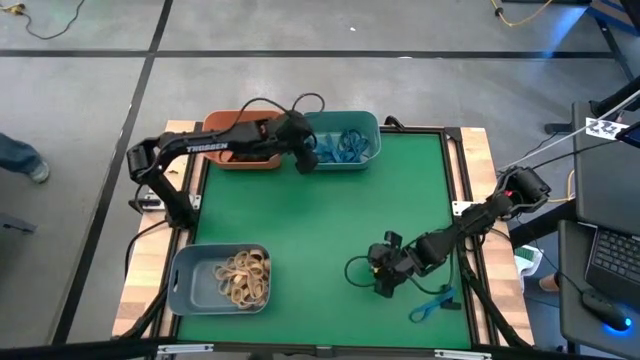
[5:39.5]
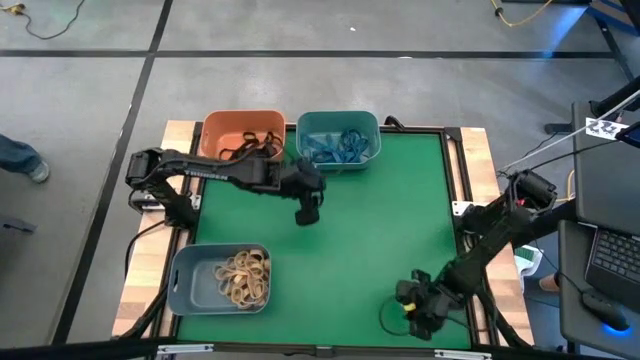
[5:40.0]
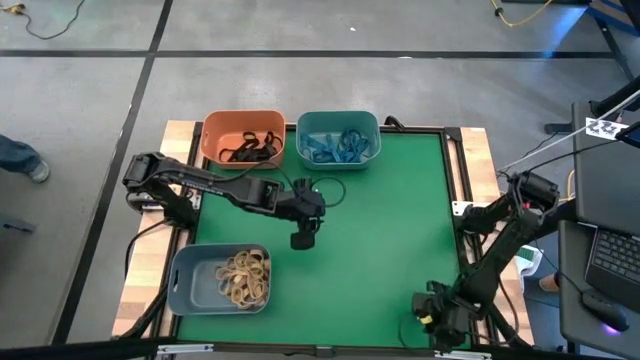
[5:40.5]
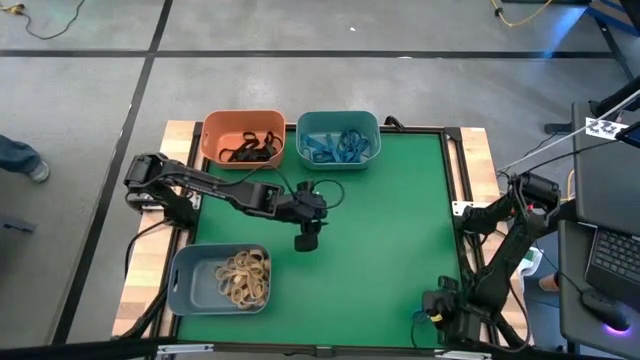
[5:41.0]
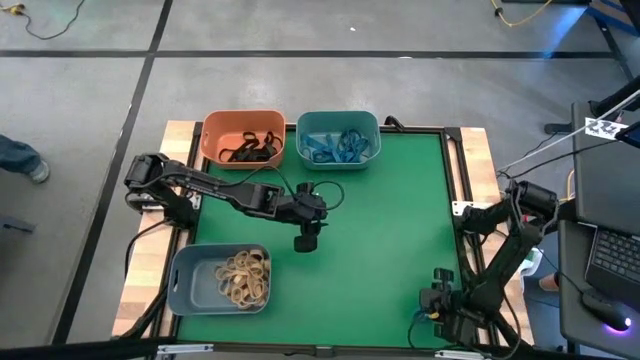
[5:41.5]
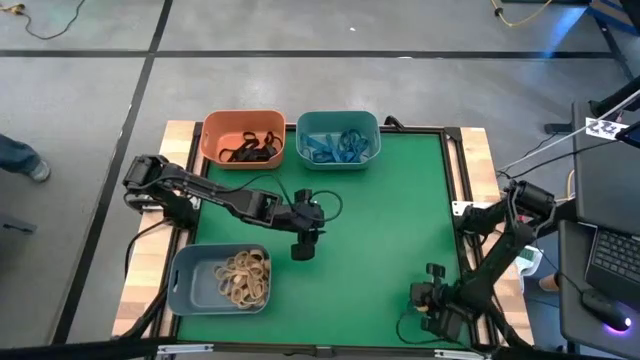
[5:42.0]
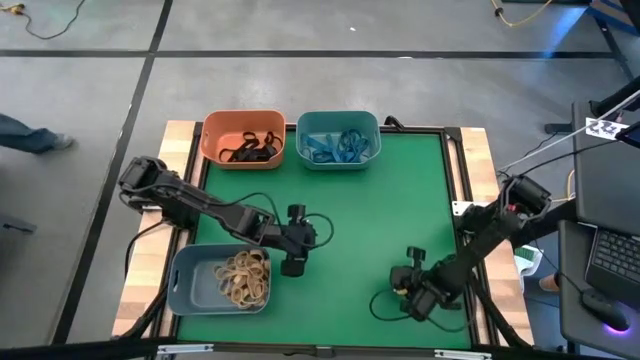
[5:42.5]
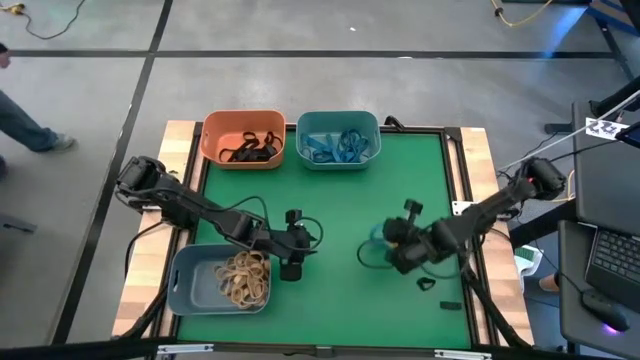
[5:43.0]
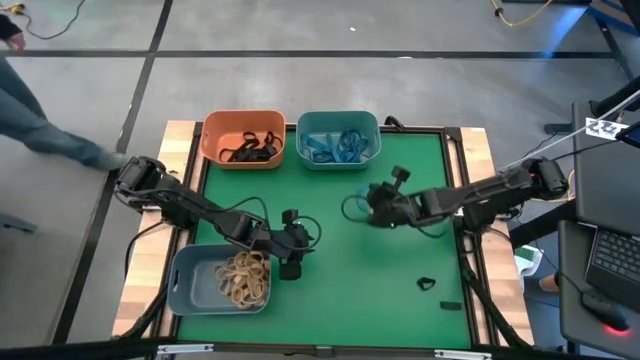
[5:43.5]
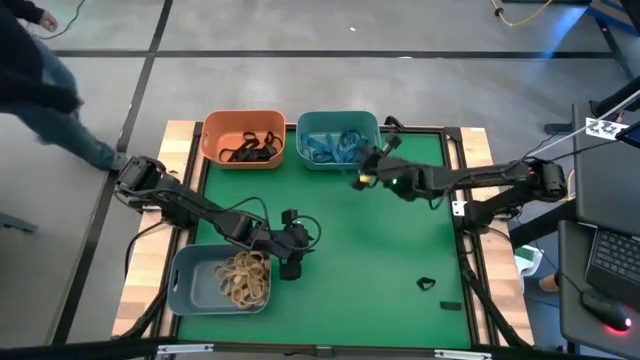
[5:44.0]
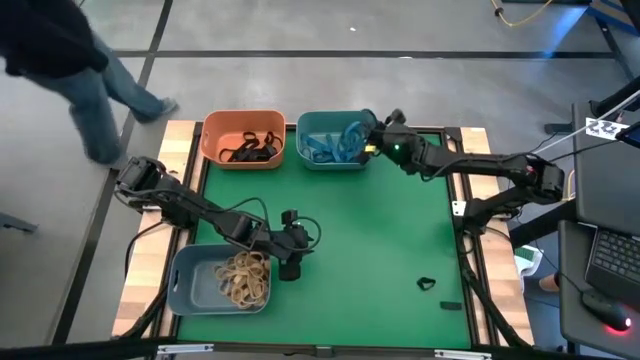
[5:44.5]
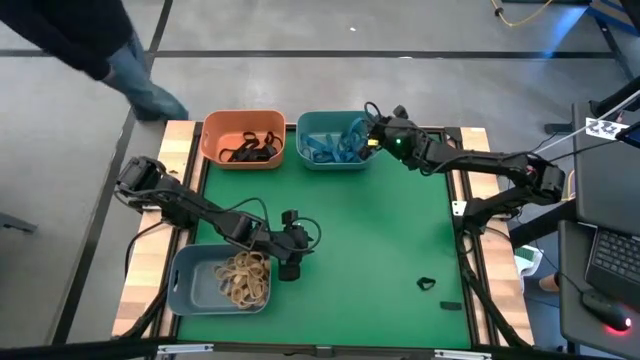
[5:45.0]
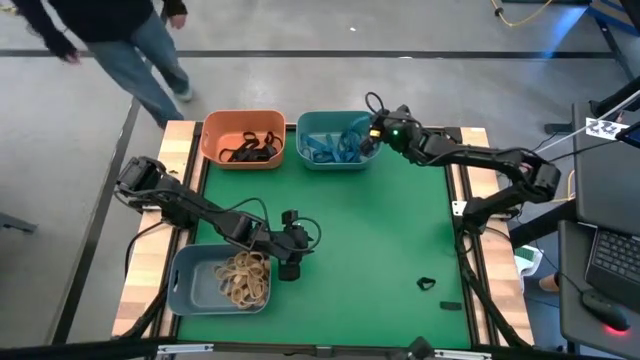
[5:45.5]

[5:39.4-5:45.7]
Task: Sort rubber bands into baskets
Put the blue rubber band into the green bin

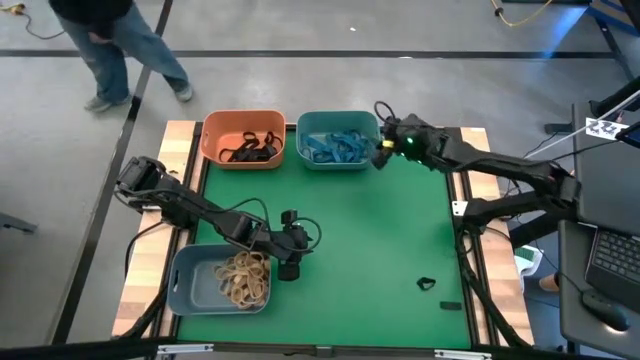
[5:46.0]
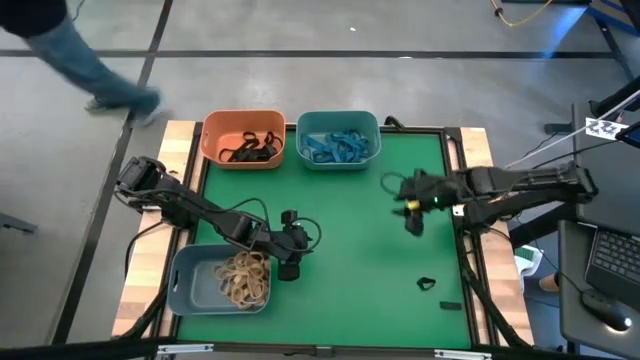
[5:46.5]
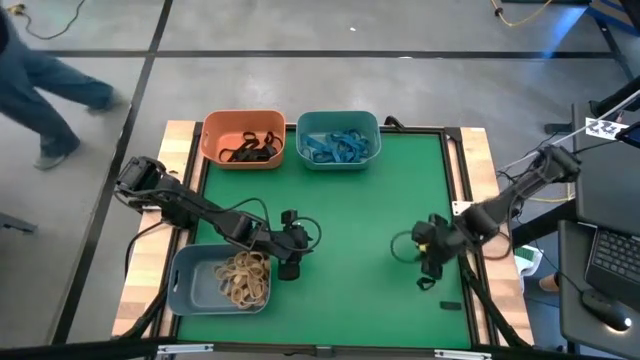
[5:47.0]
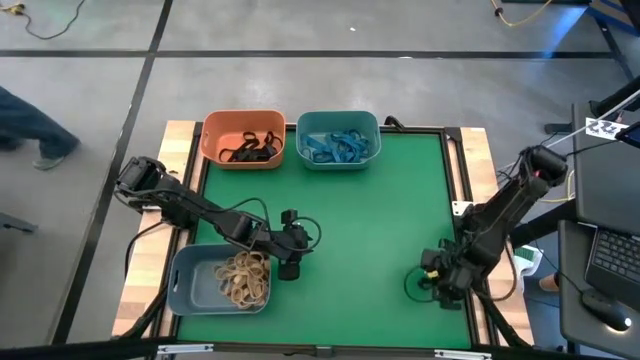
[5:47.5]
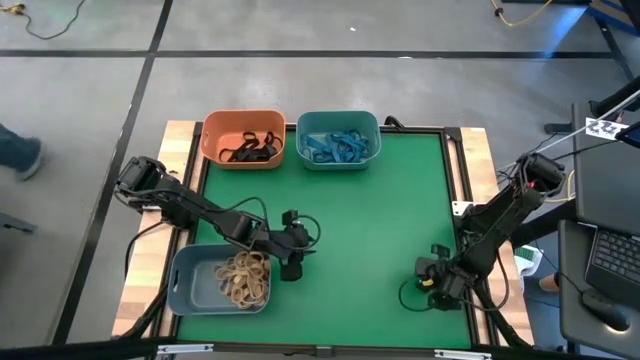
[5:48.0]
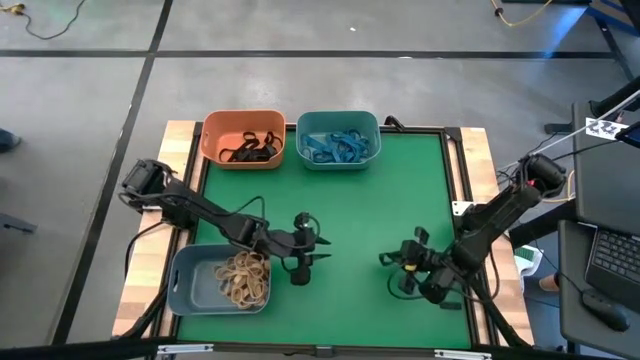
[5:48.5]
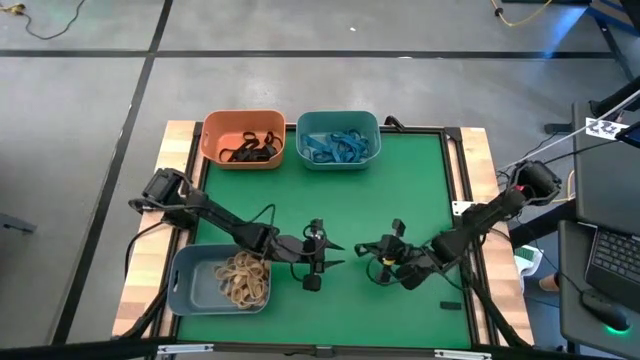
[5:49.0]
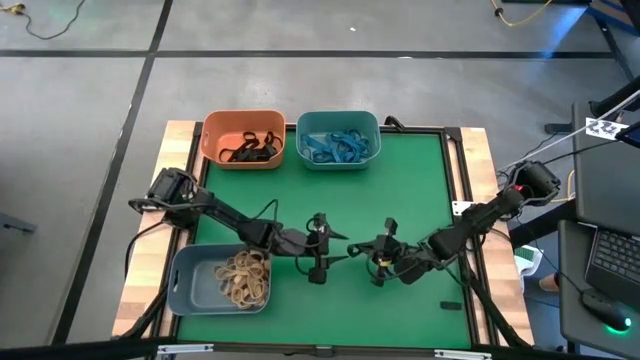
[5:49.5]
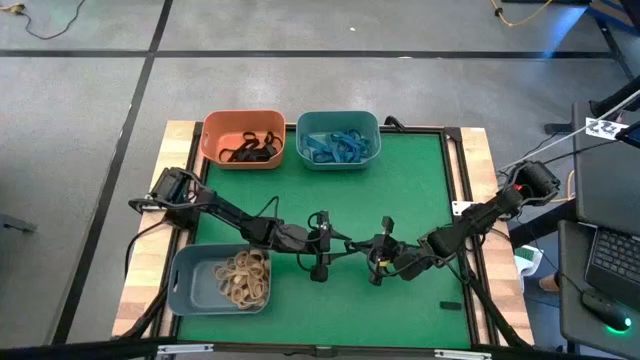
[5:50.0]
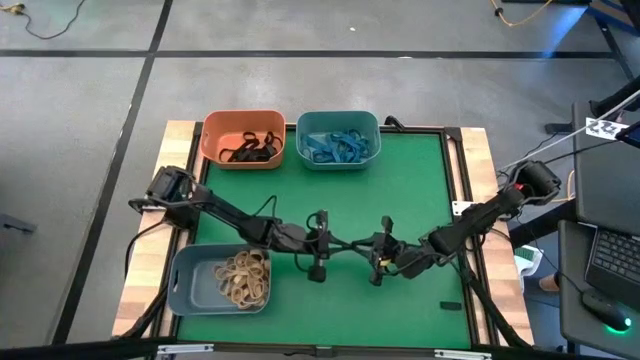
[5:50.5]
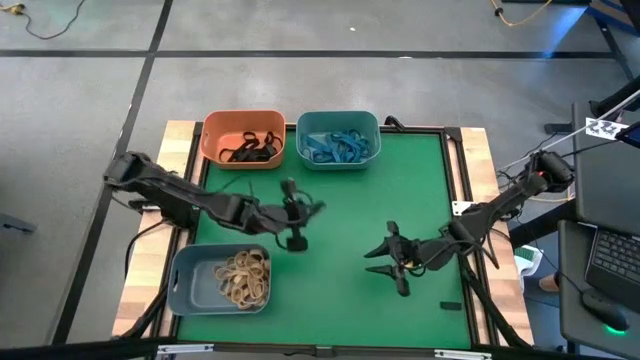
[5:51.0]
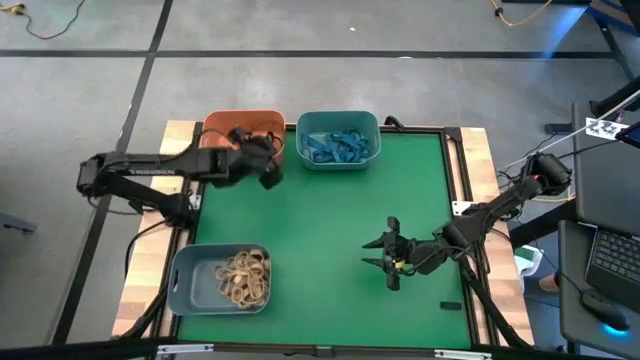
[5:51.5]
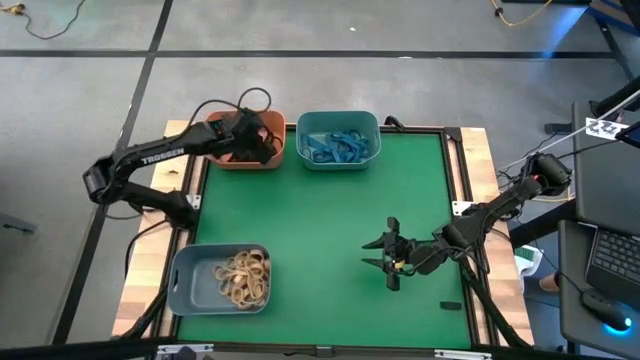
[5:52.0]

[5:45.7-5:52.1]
Put the small black rubber band into the orange bin

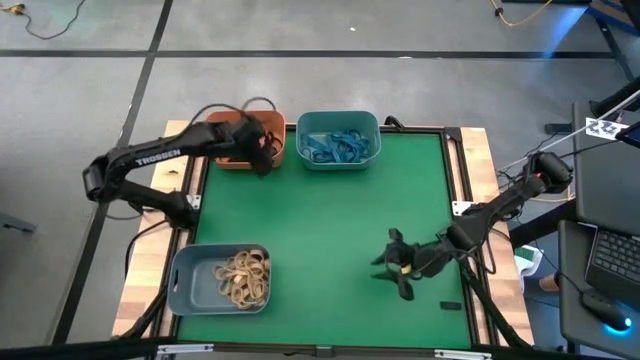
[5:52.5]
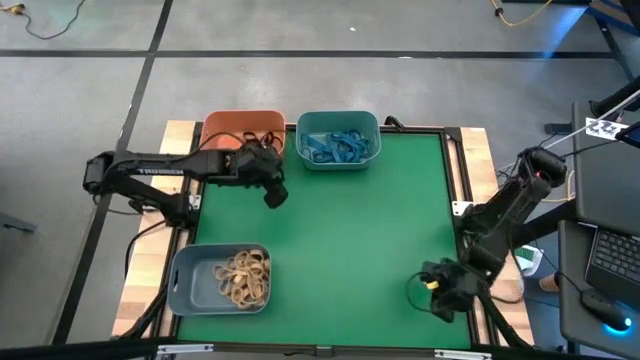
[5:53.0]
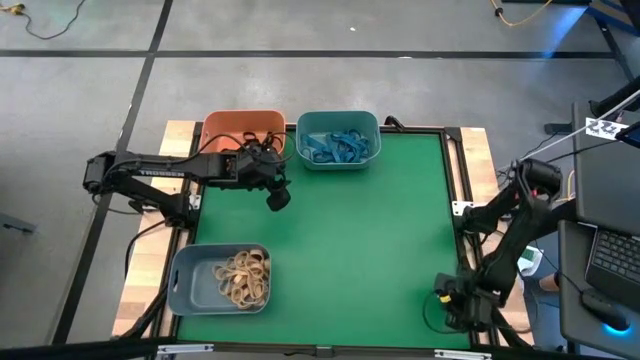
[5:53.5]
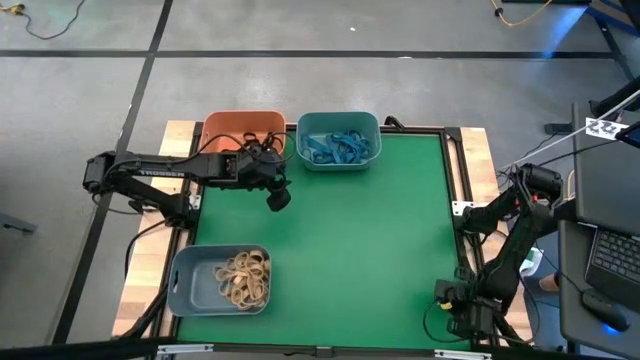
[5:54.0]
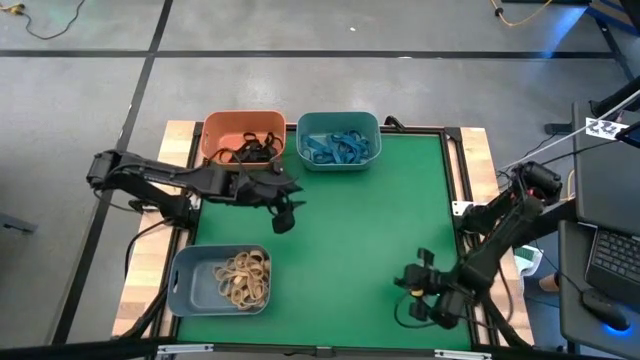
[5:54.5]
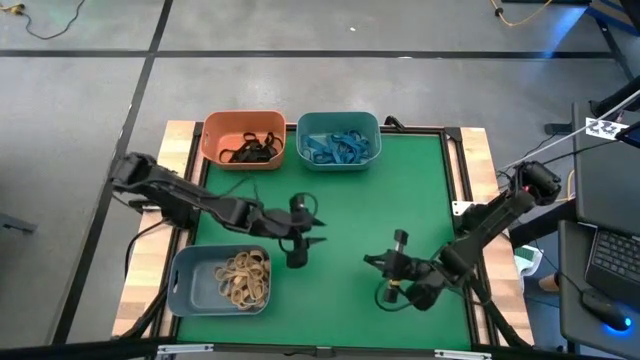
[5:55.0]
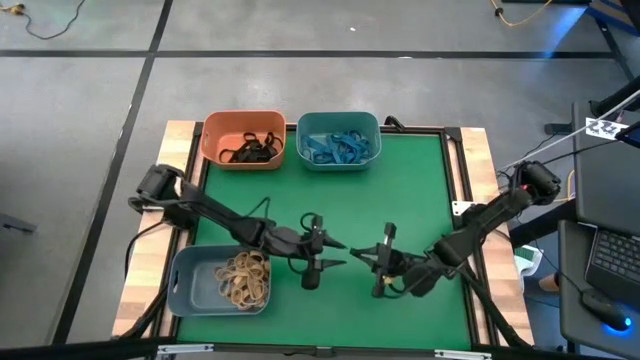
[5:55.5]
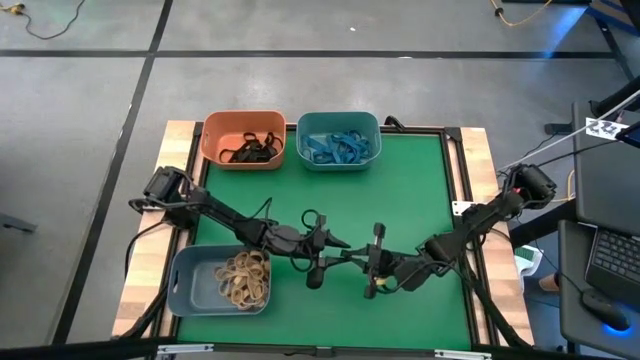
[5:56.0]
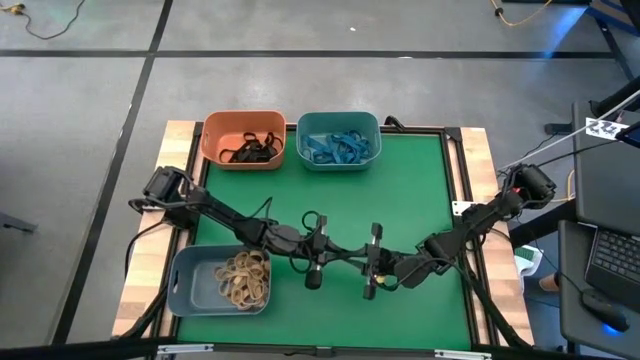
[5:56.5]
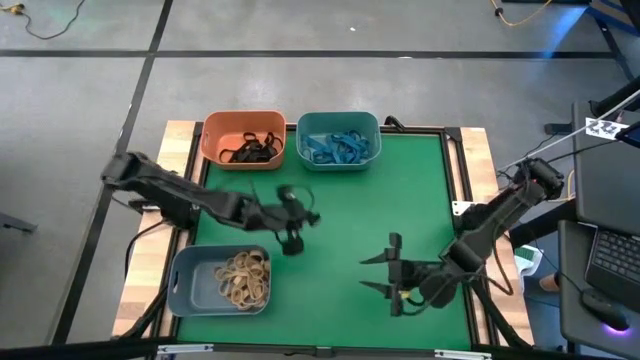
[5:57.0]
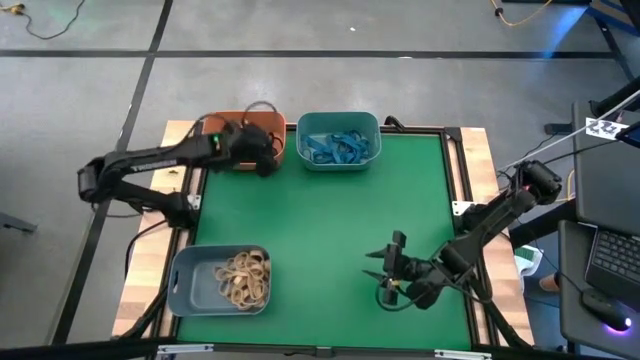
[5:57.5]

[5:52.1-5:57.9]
Put the small black rubber band into the orange bin

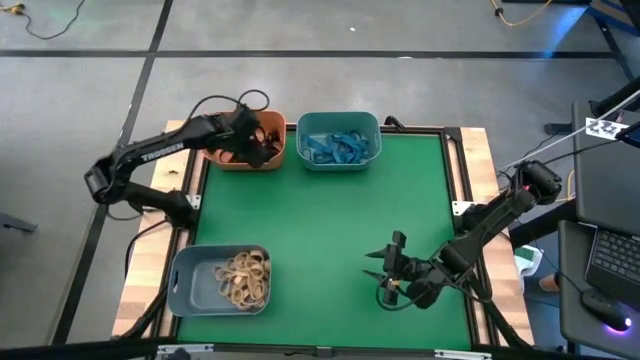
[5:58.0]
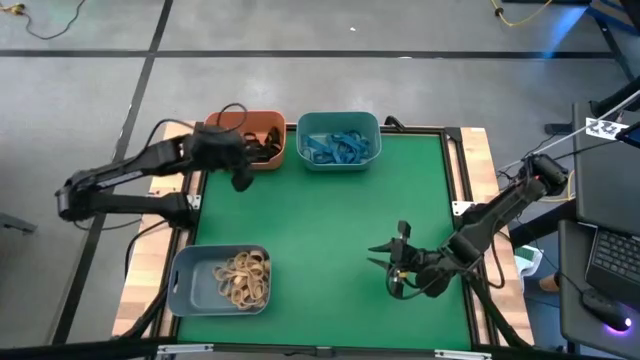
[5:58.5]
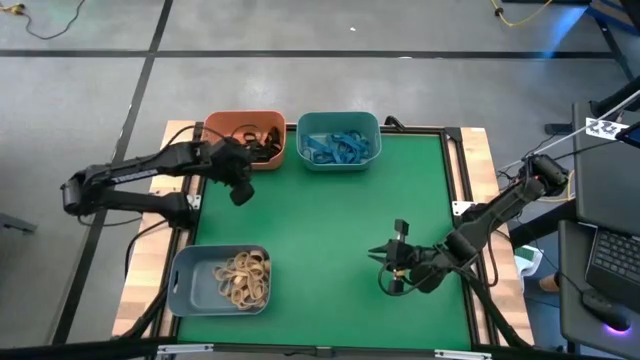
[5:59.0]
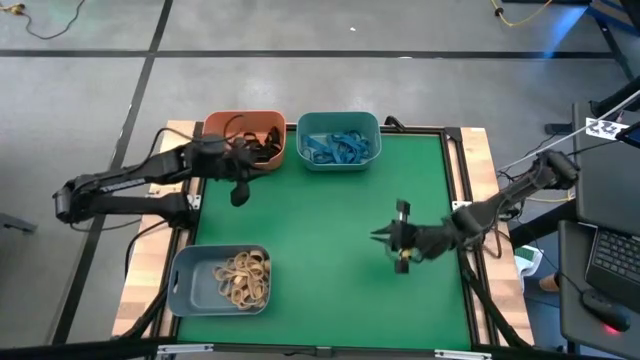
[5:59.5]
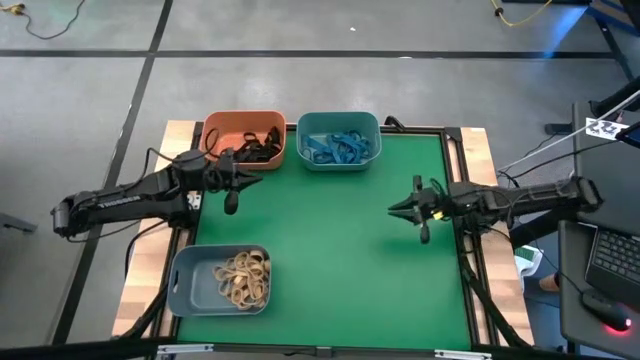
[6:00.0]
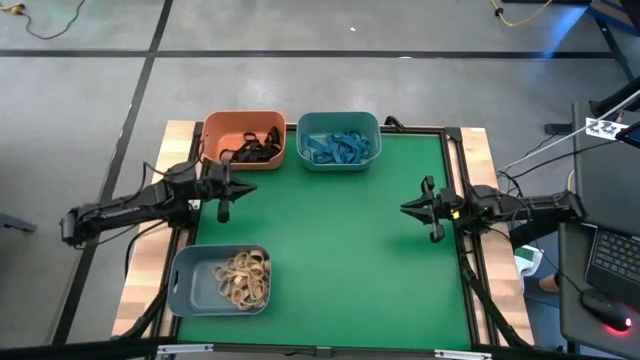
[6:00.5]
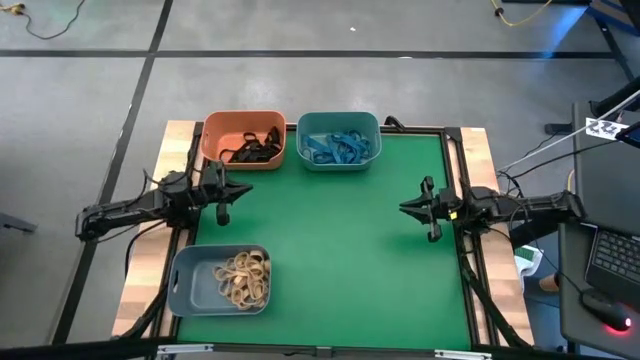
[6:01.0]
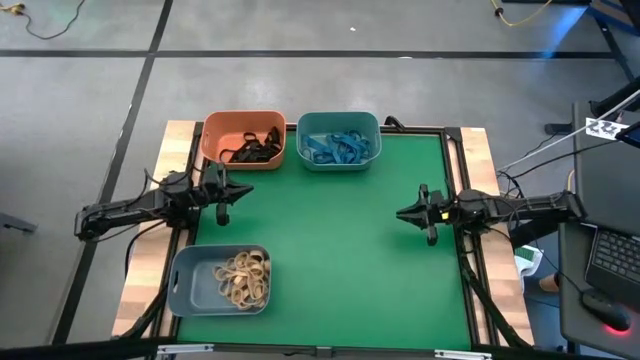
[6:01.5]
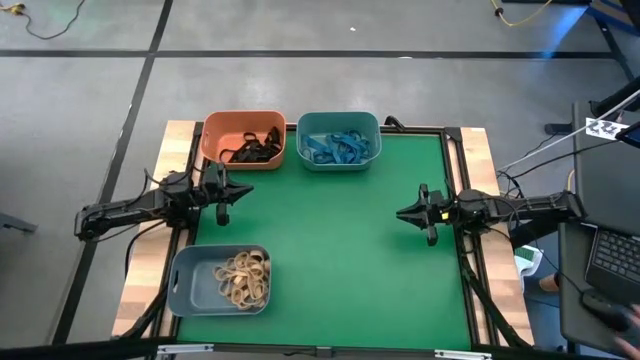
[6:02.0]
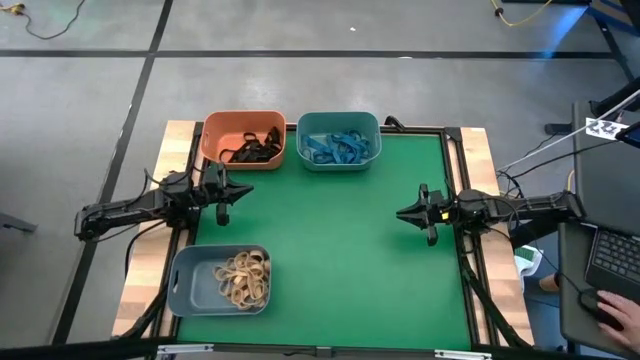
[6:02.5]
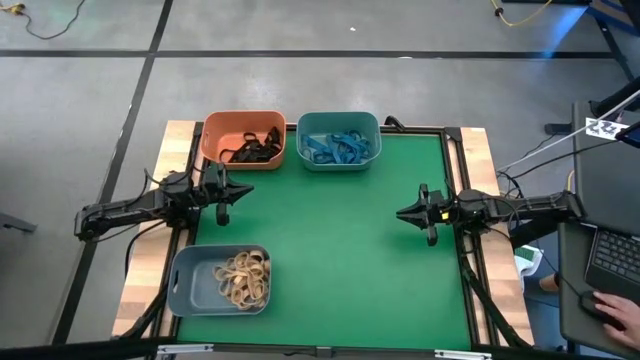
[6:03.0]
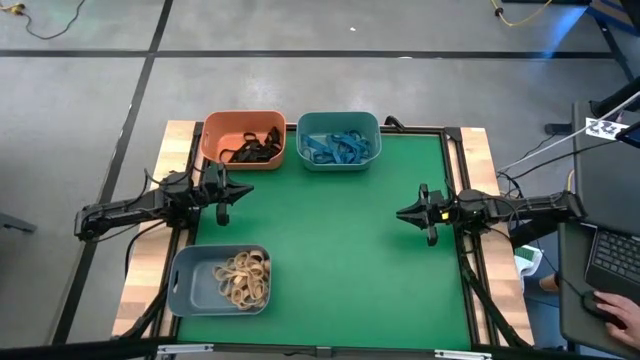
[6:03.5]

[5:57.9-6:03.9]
Return to Home Position
